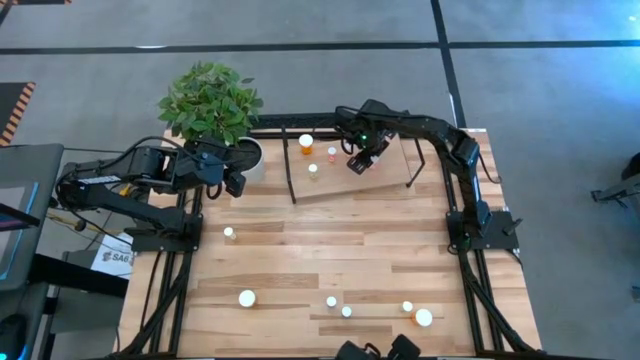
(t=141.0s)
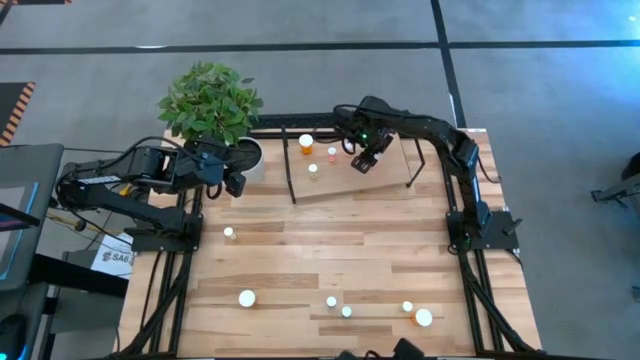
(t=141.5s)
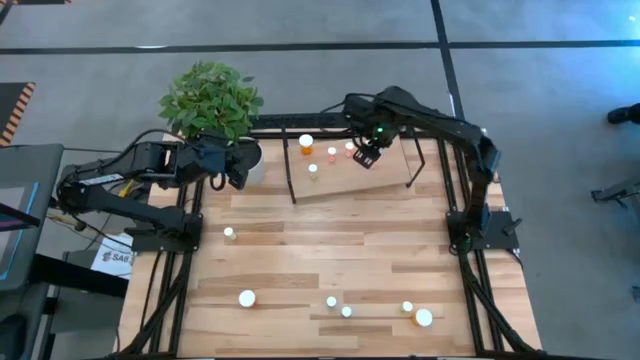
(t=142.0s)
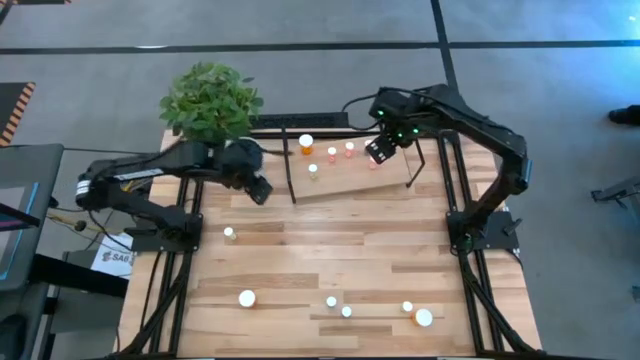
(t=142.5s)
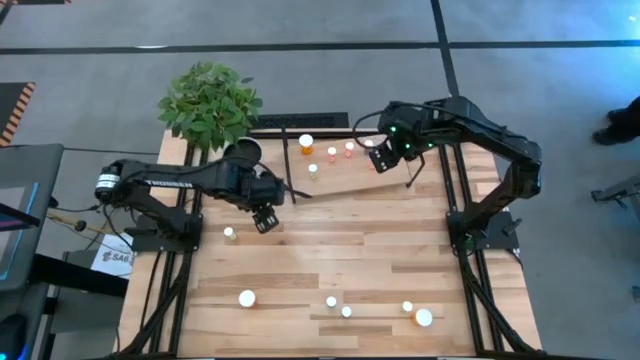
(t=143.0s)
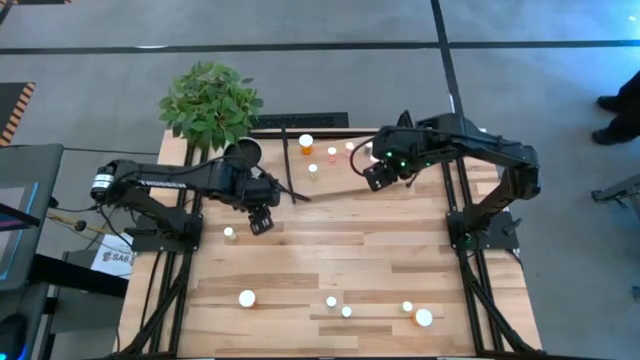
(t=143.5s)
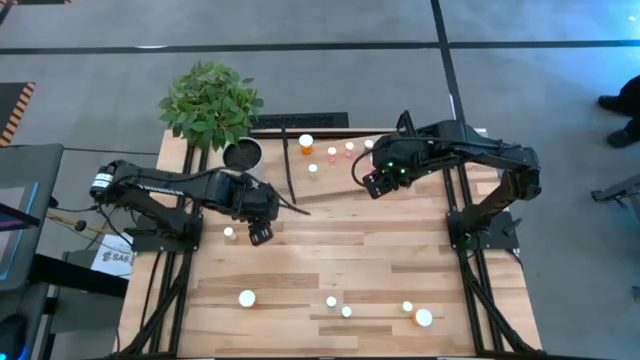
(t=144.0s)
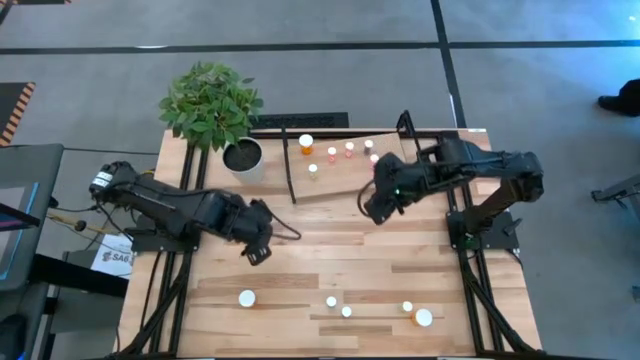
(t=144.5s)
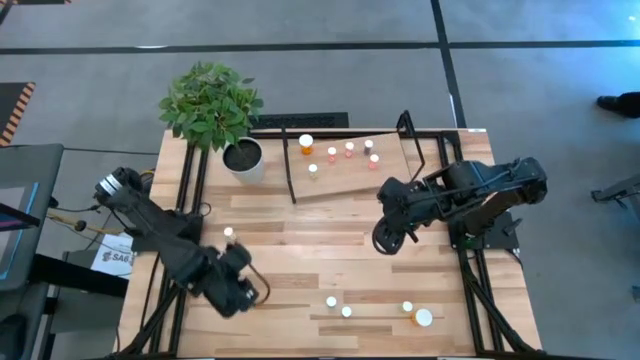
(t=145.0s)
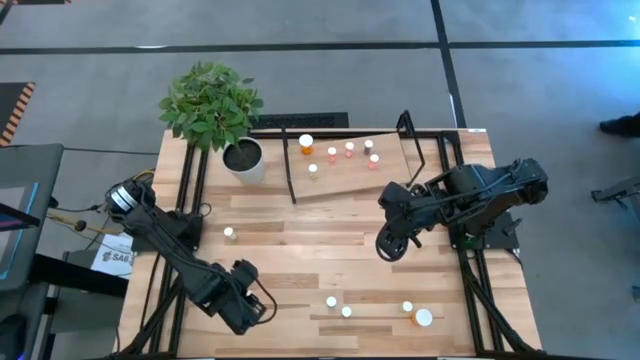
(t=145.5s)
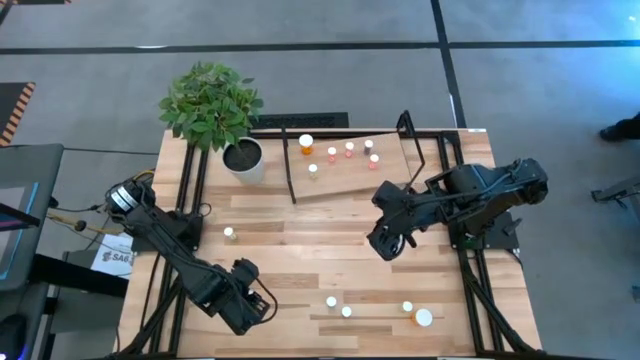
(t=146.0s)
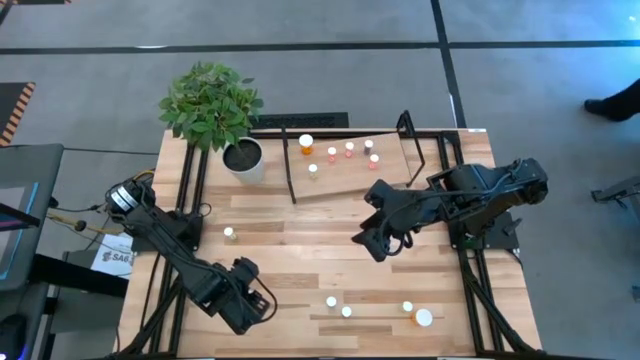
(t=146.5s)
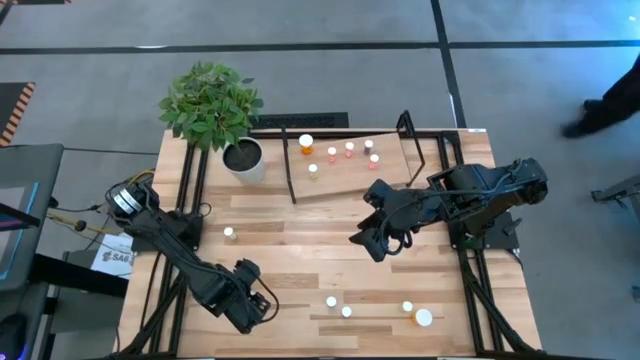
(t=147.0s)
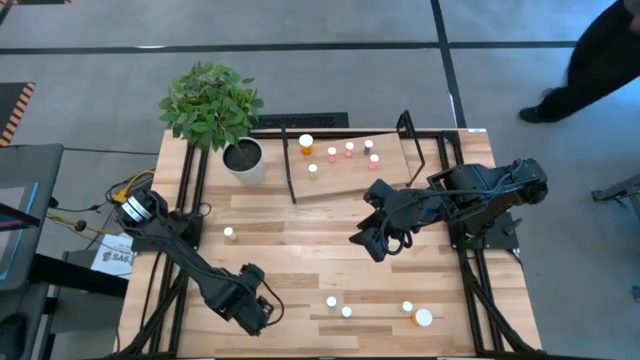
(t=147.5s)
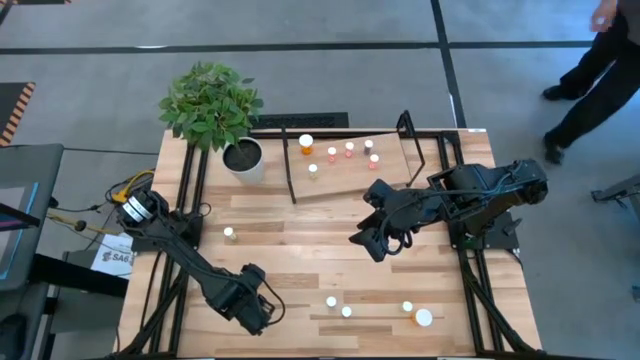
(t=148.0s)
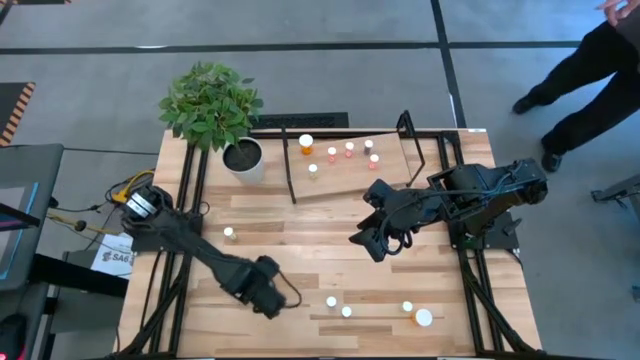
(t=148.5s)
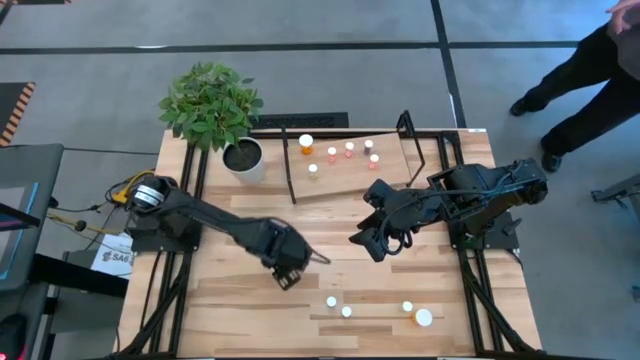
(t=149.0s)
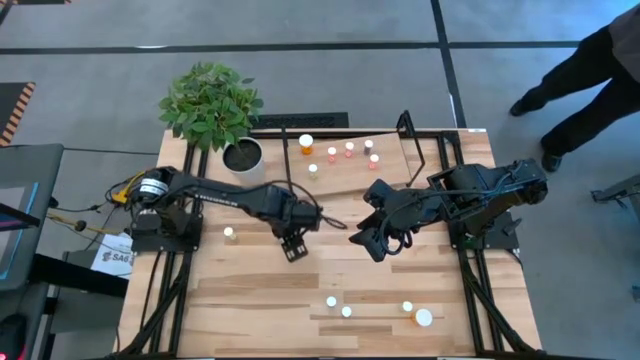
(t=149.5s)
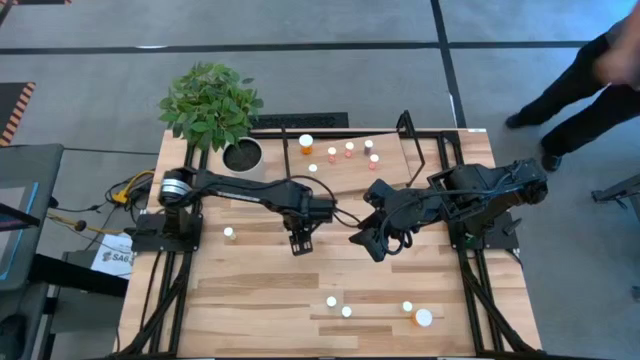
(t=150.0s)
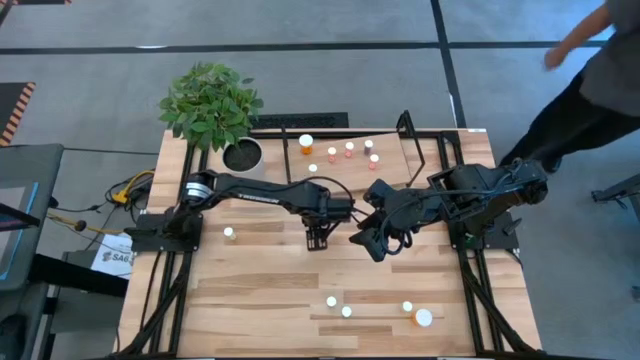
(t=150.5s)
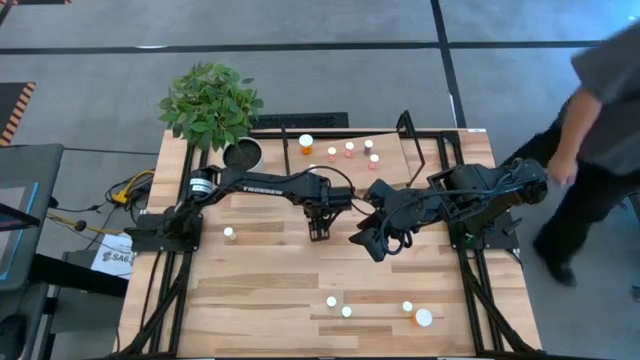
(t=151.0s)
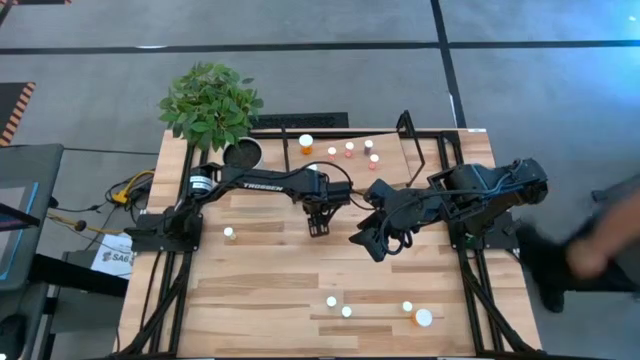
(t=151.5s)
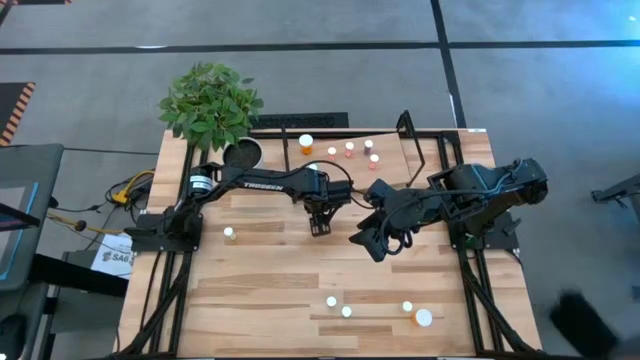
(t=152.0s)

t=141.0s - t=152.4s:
Task: Pick and place medicine bottles onto shelf by color
Move the orange pill bottle to the center of the table

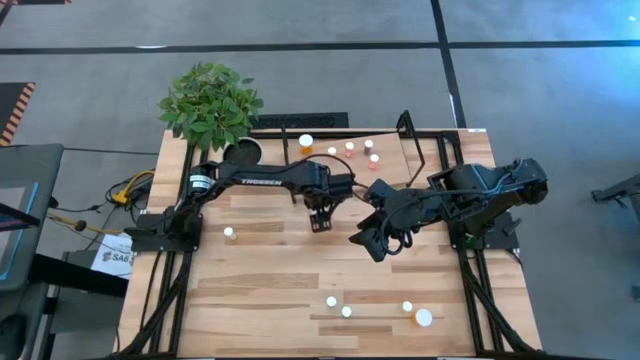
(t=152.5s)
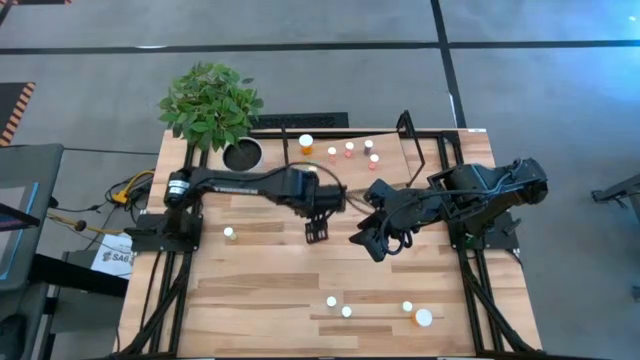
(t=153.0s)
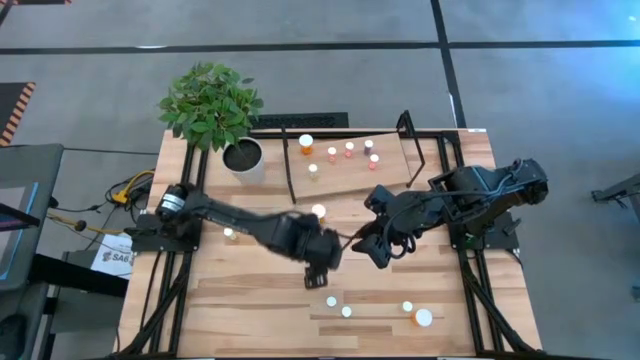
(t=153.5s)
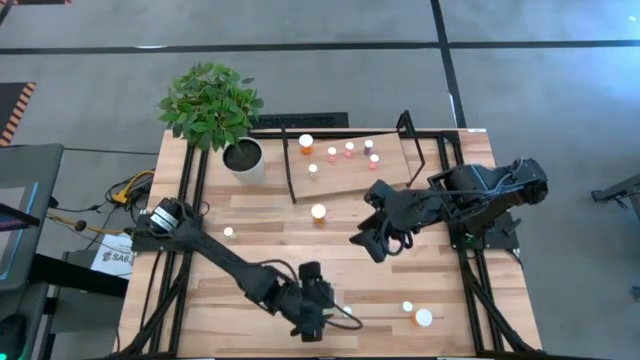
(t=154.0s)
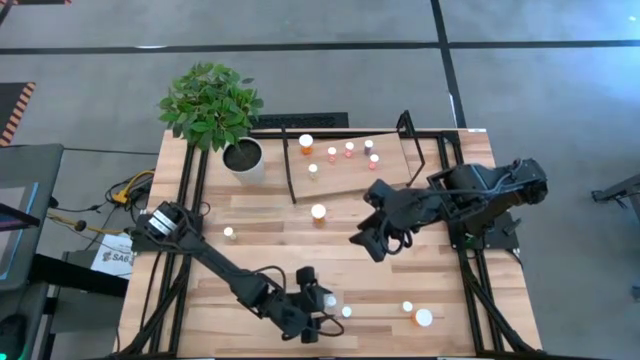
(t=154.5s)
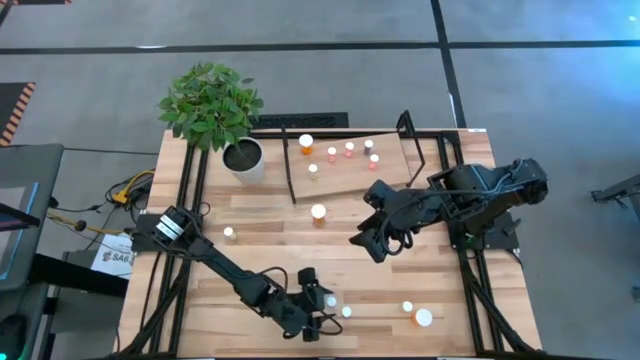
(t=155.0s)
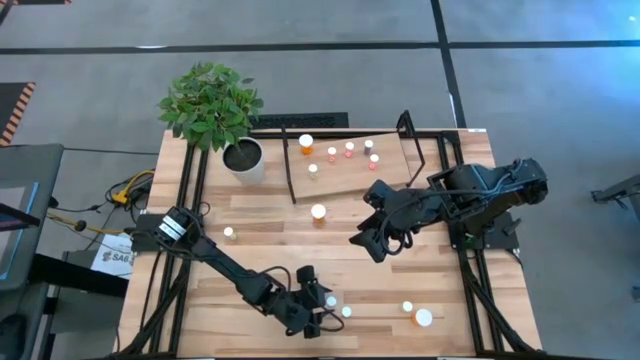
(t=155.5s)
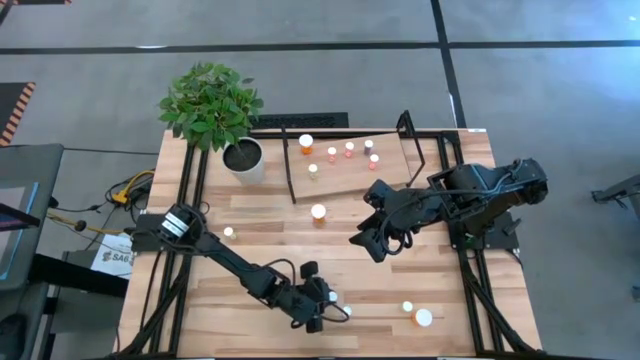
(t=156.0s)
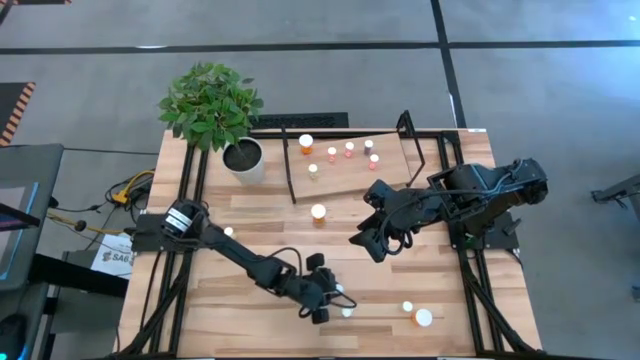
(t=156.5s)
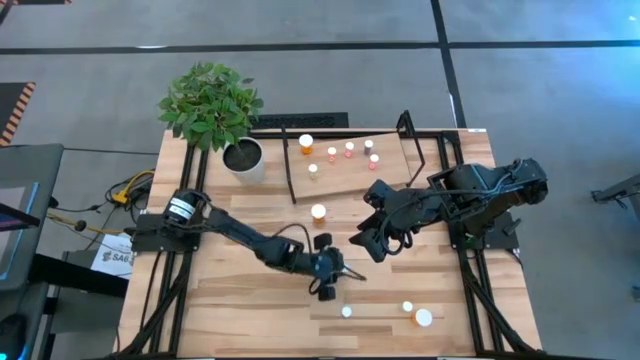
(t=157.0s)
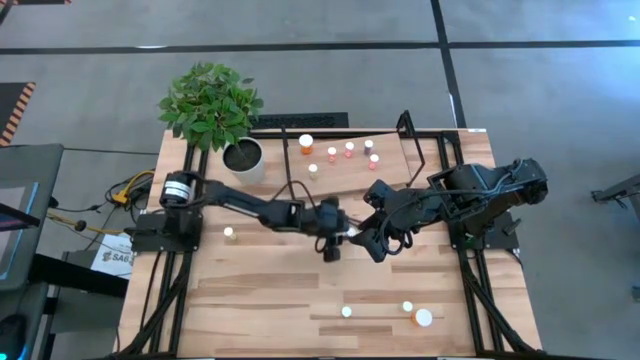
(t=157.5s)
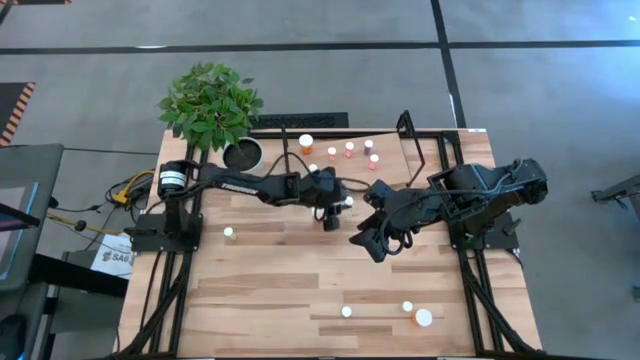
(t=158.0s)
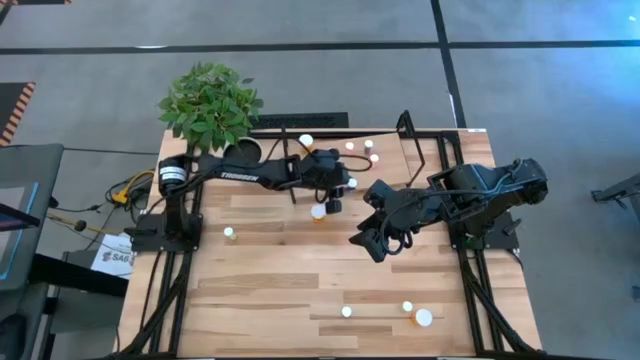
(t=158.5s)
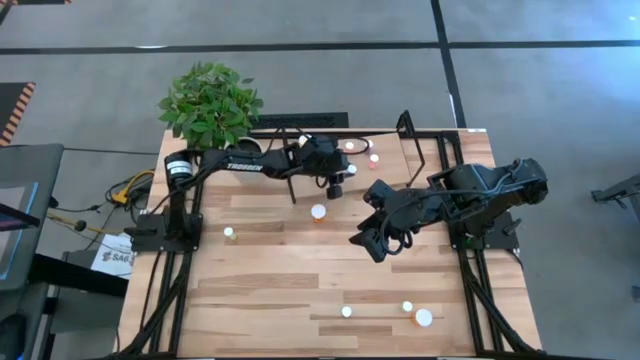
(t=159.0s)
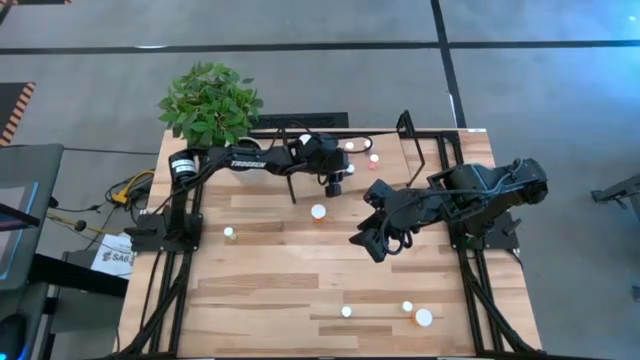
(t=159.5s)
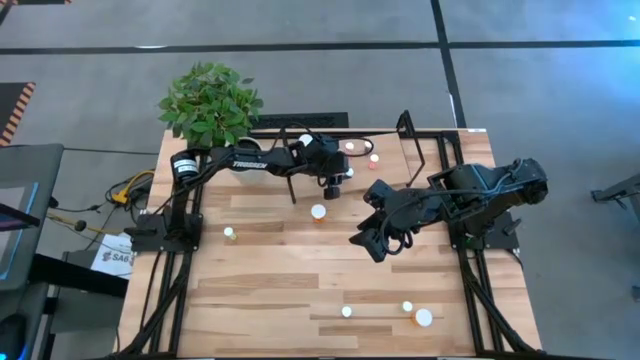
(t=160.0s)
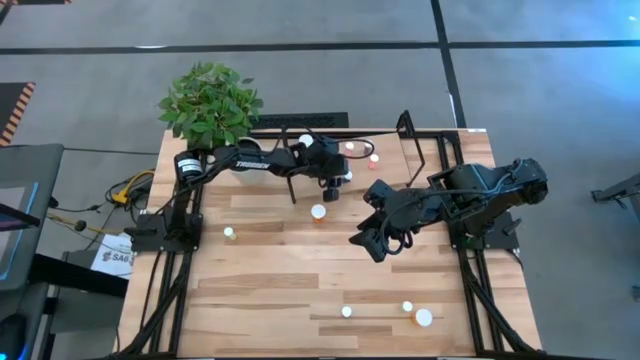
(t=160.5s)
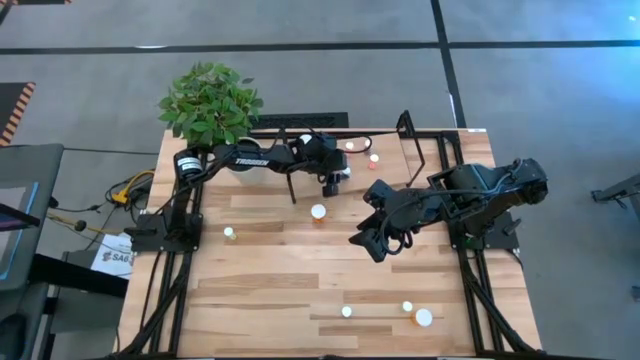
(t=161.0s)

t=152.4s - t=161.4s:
Put the top blue pill bottle on the shelf
